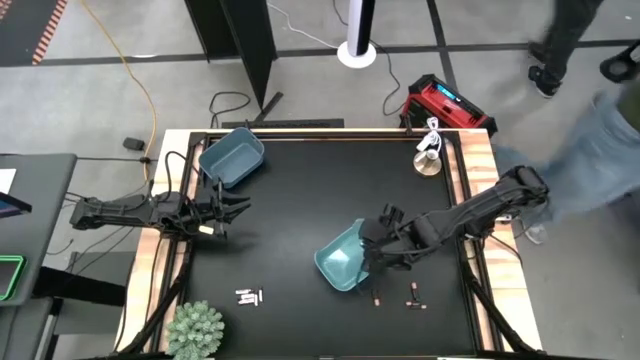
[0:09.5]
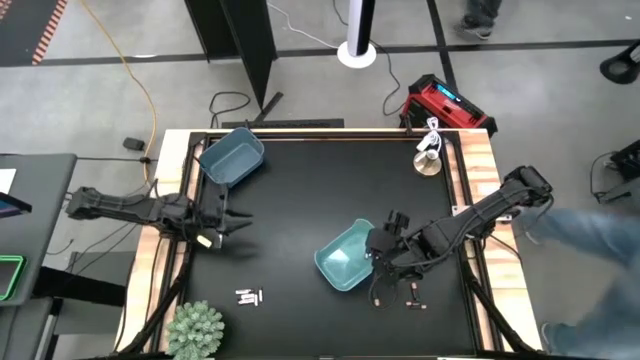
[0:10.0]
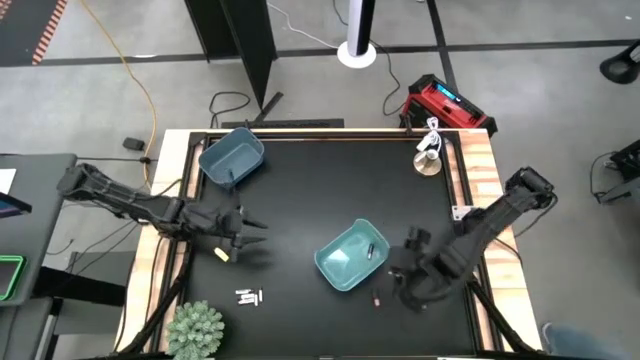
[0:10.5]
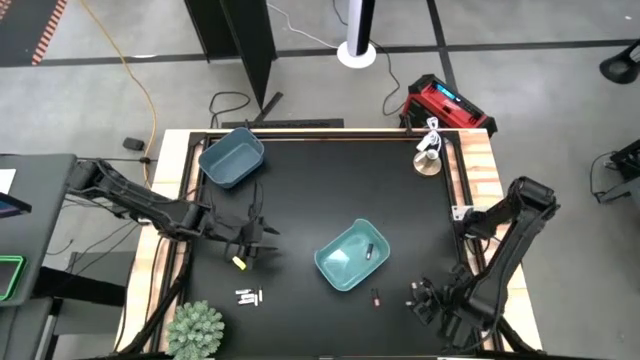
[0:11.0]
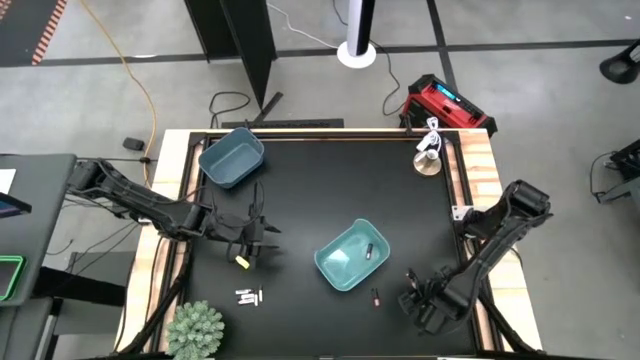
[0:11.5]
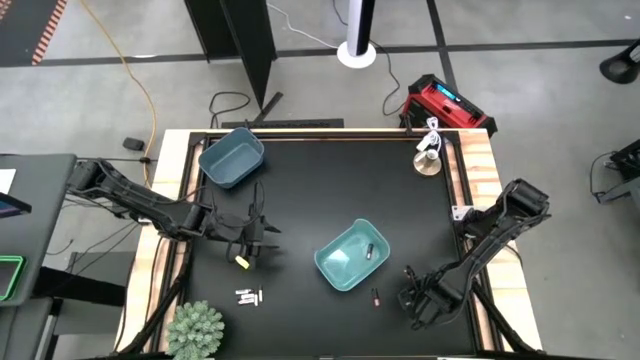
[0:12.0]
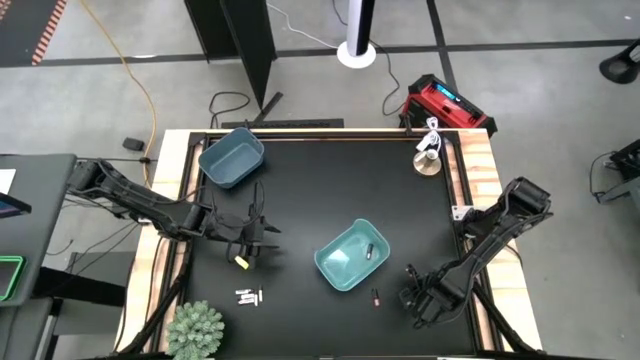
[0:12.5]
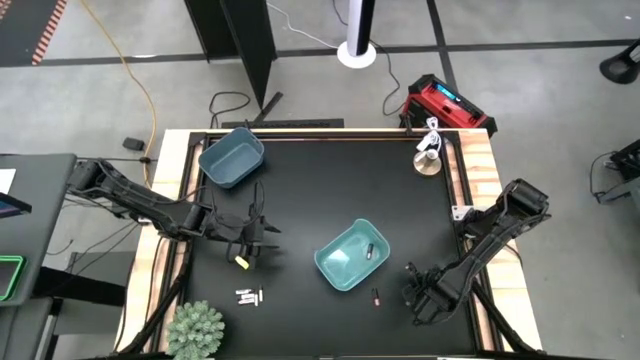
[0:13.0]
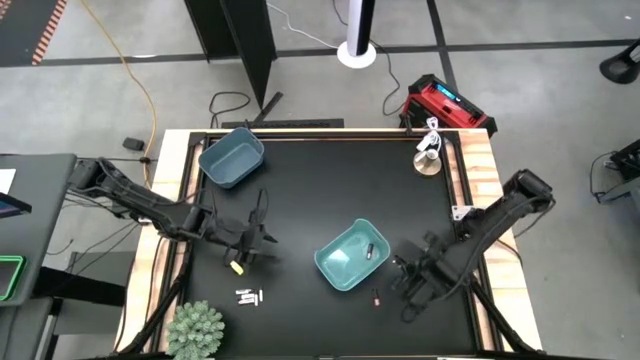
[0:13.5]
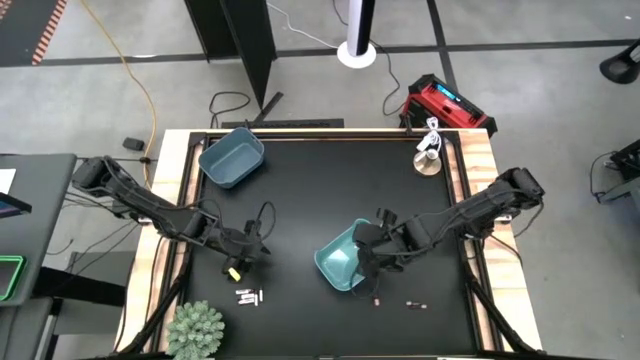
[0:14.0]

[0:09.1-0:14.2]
Task: Sort batteries
Put the black-brown battery into the light blue bin

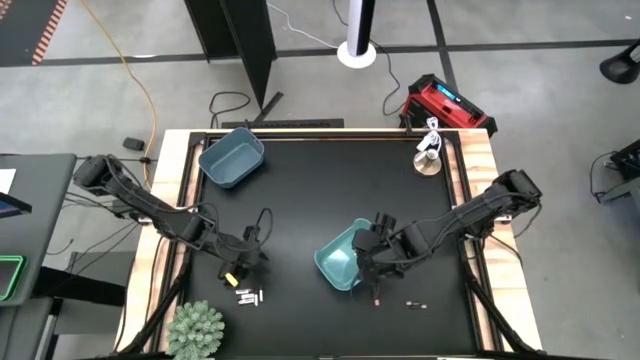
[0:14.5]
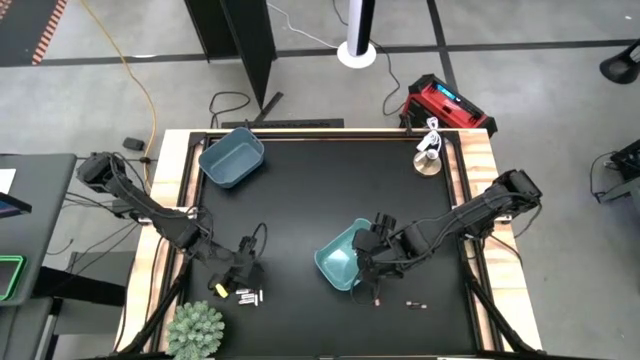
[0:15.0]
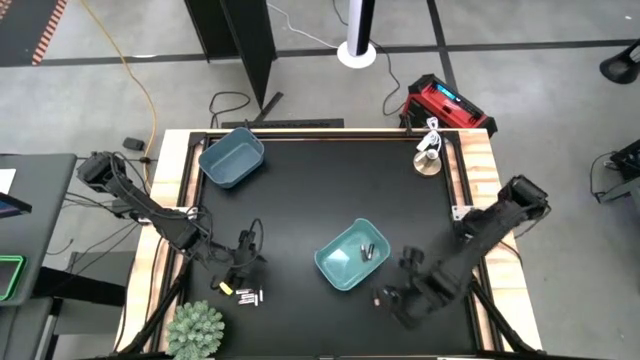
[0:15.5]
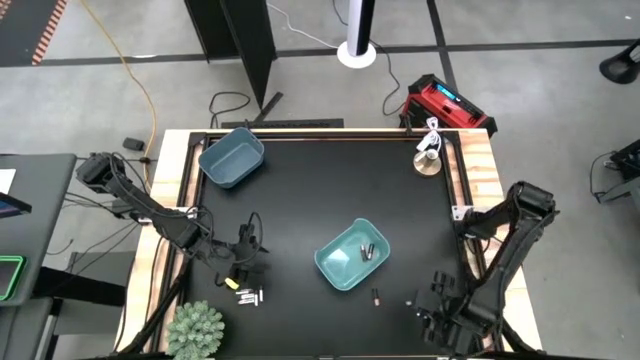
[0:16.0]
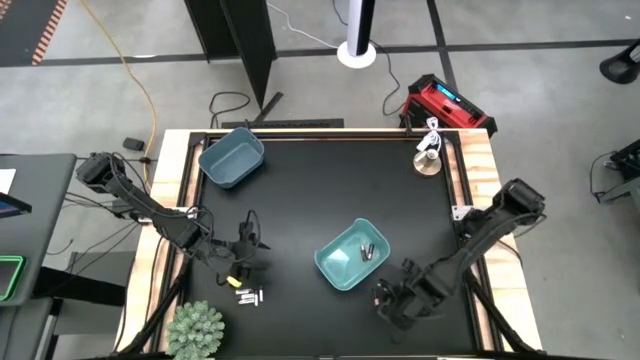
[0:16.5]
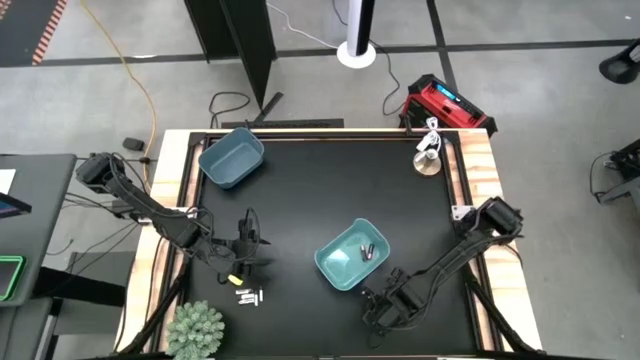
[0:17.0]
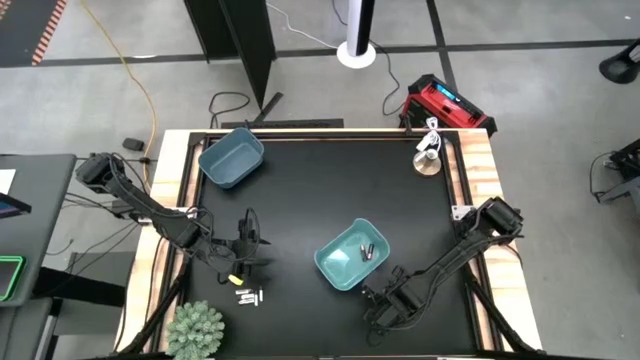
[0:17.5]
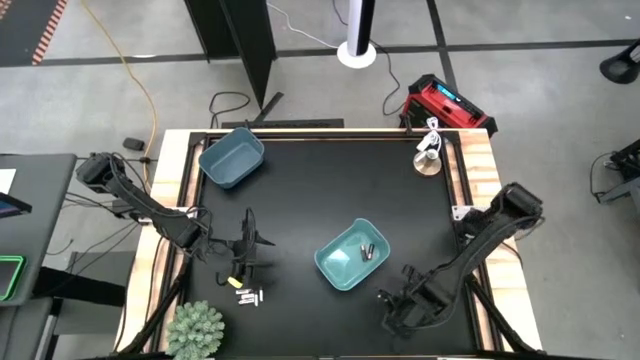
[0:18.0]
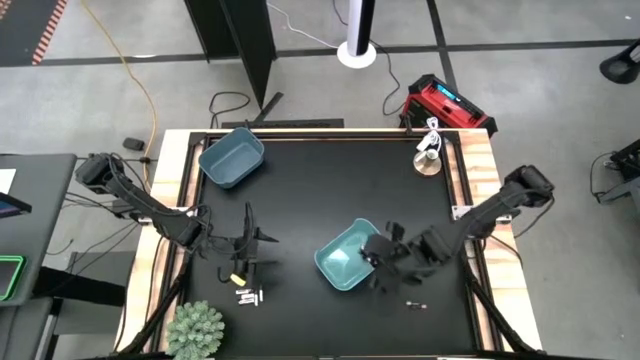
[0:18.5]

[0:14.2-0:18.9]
Put the black-brown battery into the light blue bin

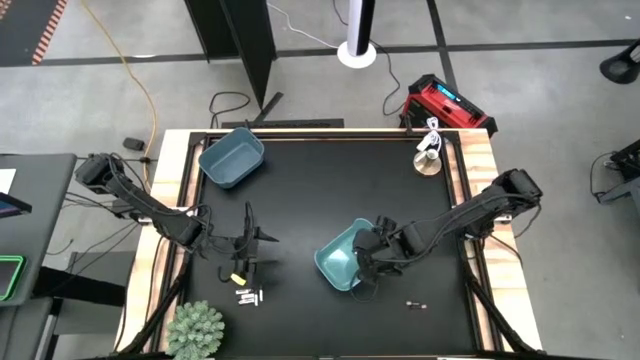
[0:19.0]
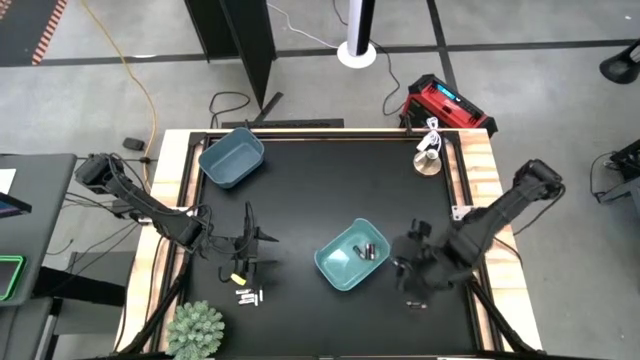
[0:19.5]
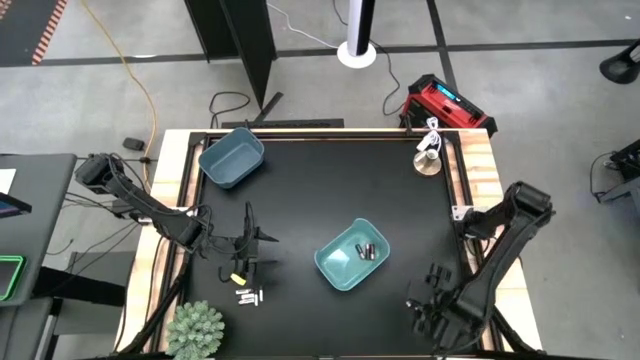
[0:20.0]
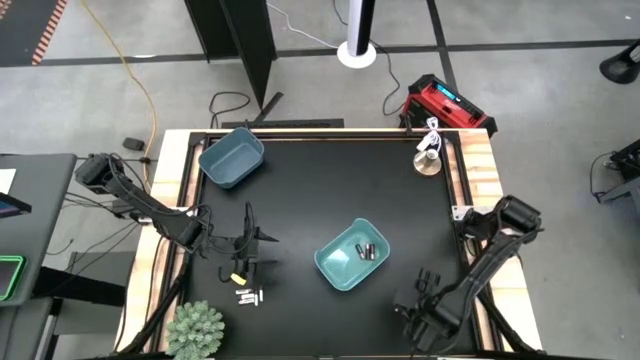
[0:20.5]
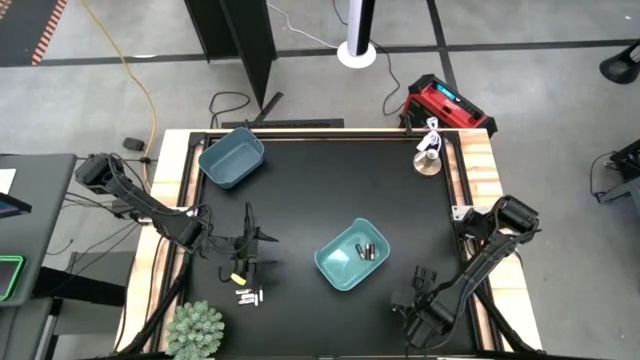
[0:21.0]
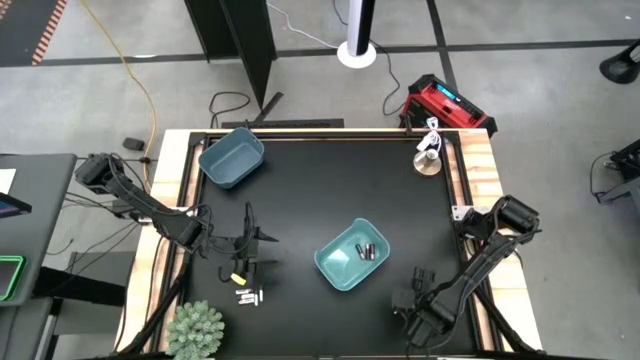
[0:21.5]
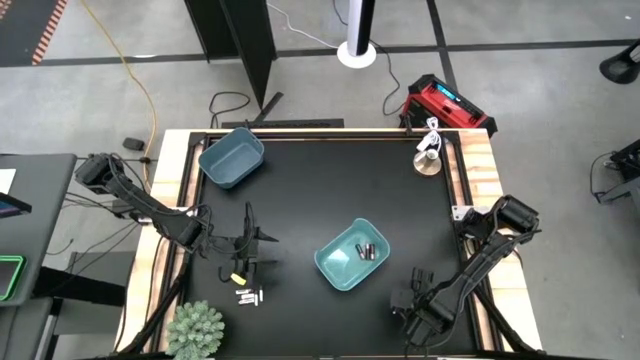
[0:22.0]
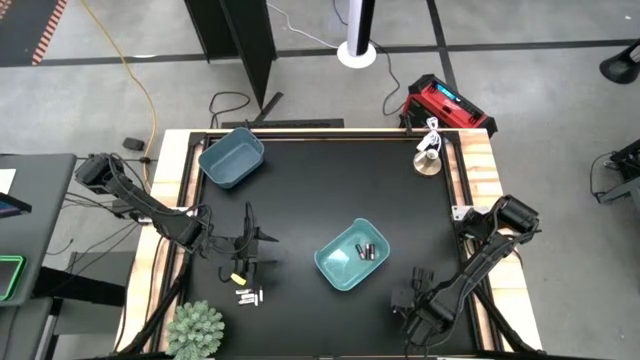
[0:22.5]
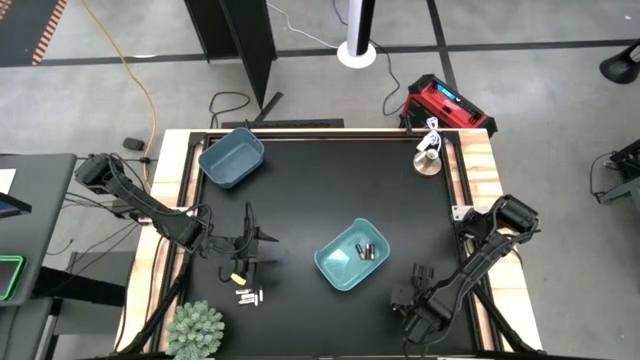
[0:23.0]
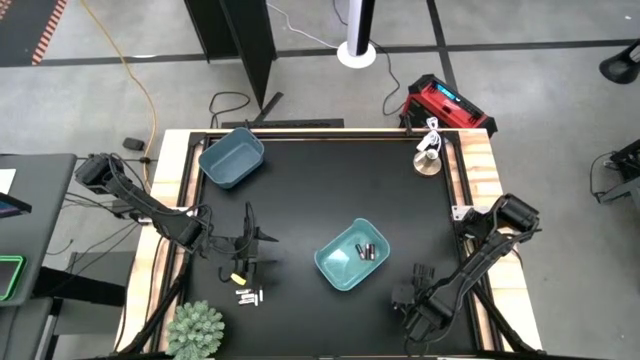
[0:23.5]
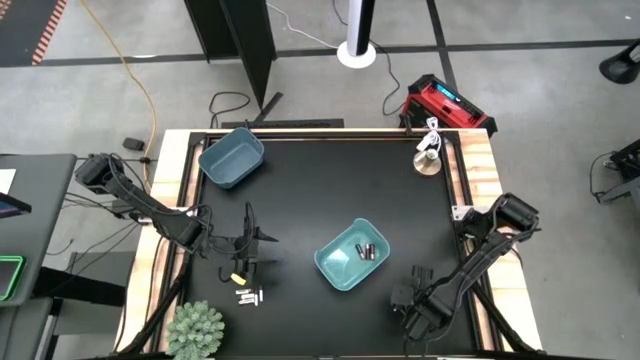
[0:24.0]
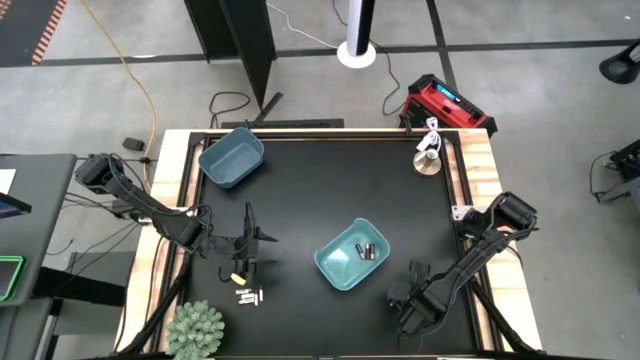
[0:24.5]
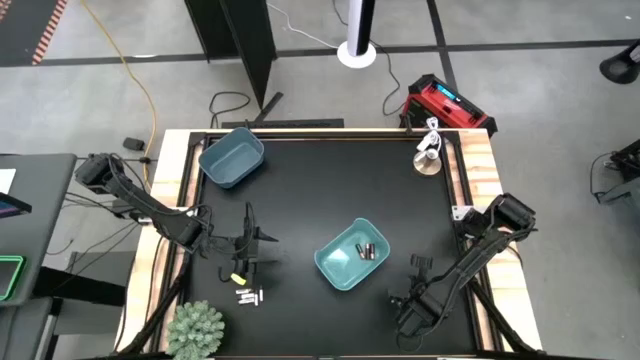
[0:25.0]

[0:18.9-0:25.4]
Put the black-brown battery into the light blue bin

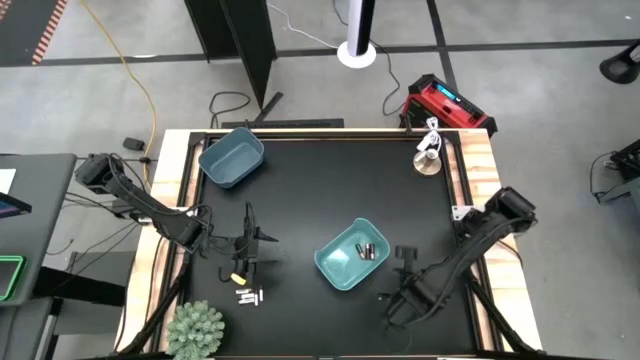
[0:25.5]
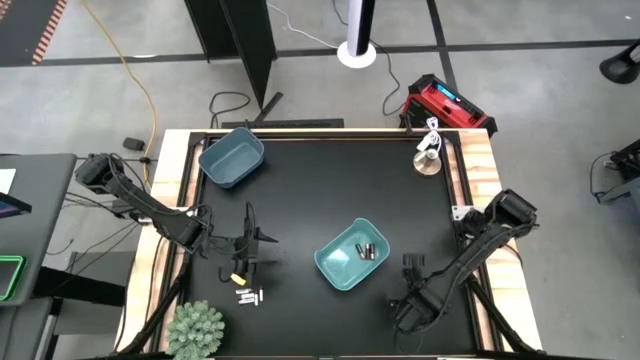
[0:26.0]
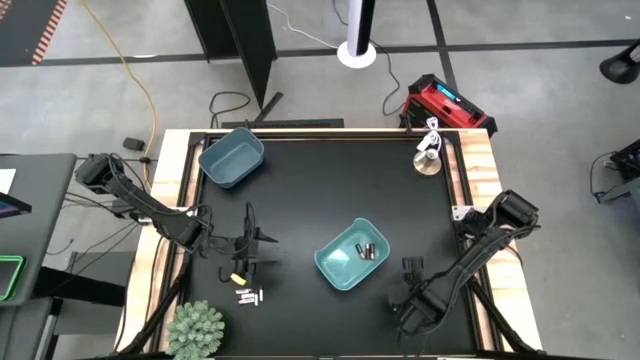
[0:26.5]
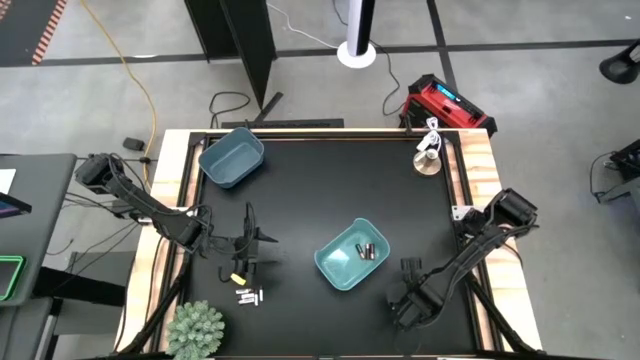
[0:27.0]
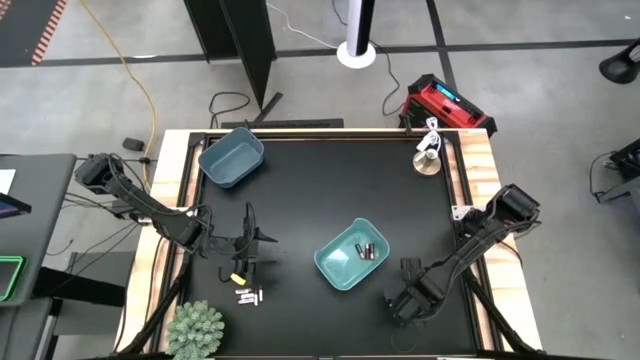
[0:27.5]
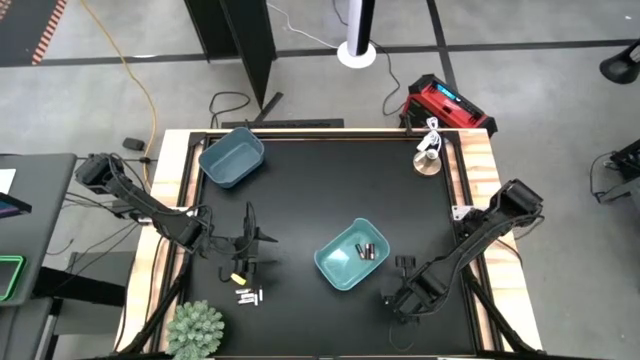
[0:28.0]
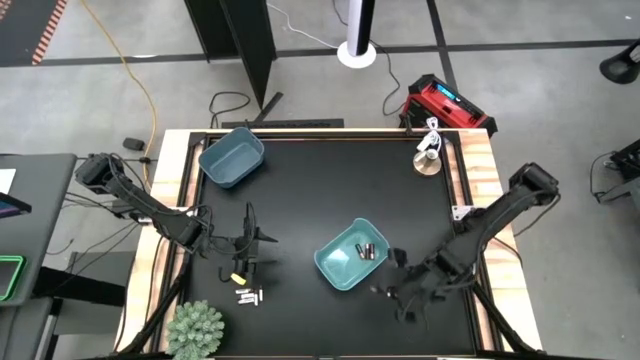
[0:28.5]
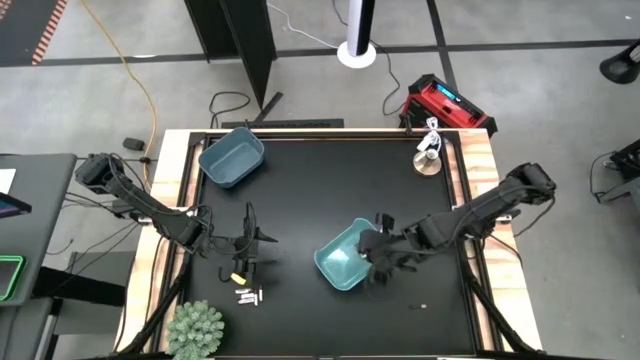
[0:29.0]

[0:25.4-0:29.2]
Put the black-brown battery into the light blue bin

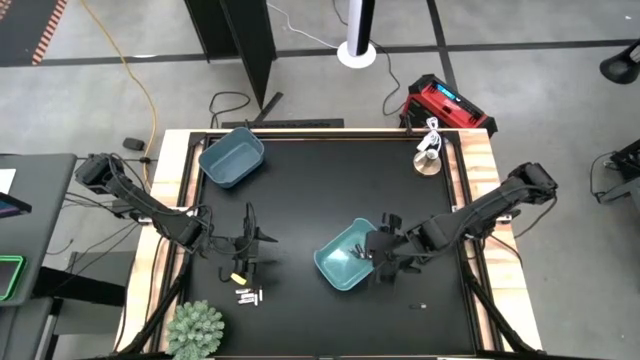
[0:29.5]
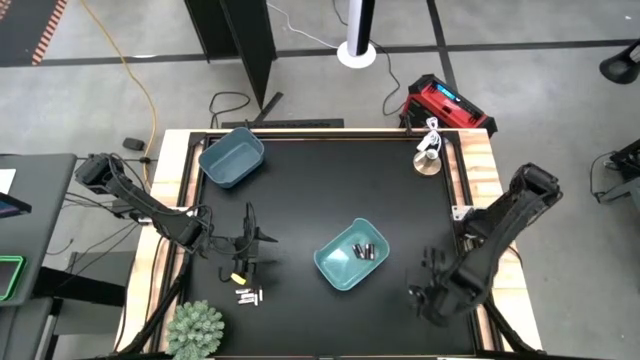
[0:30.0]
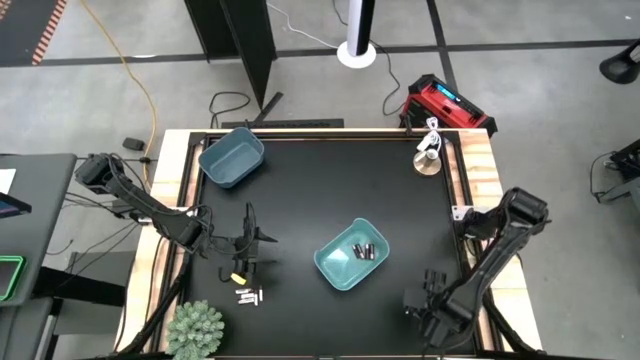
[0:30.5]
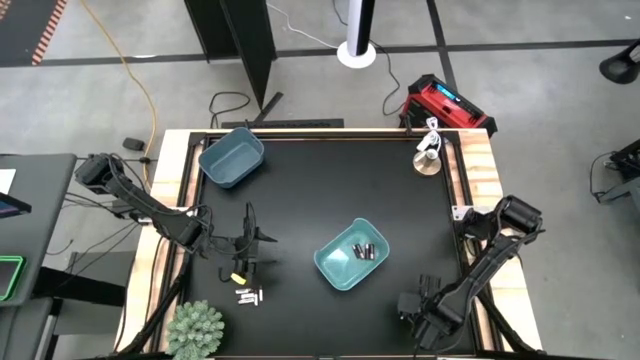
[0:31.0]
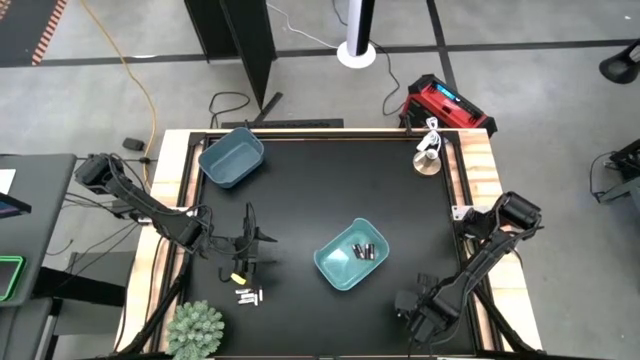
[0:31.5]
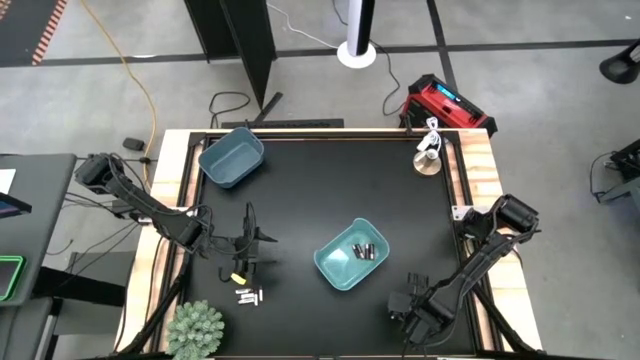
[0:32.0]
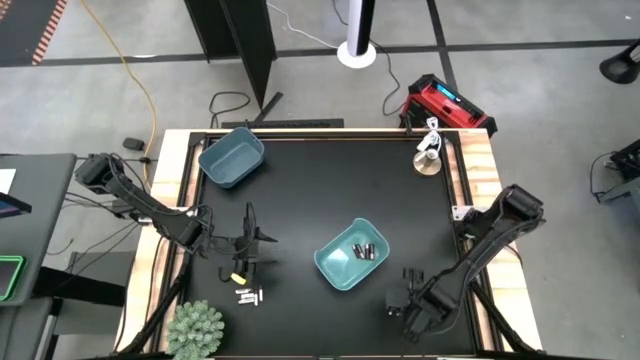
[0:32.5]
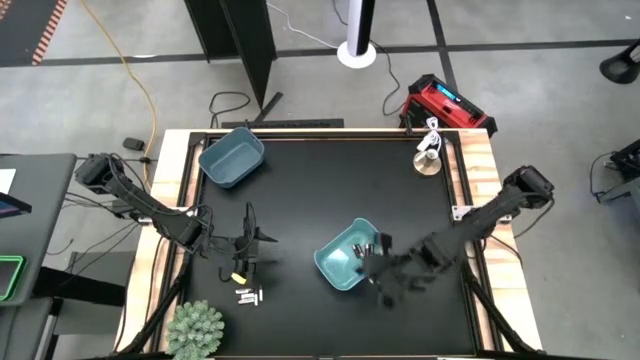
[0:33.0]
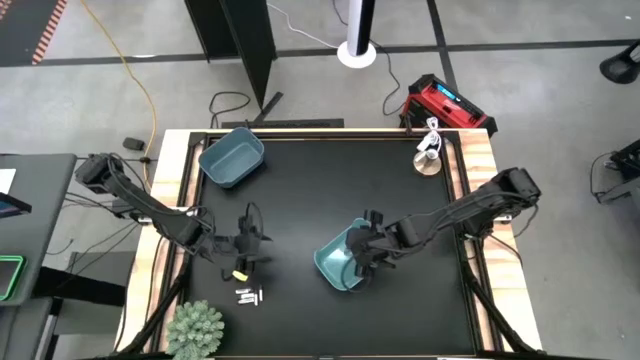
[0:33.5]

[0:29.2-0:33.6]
Put the black-brown battery into the light blue bin
